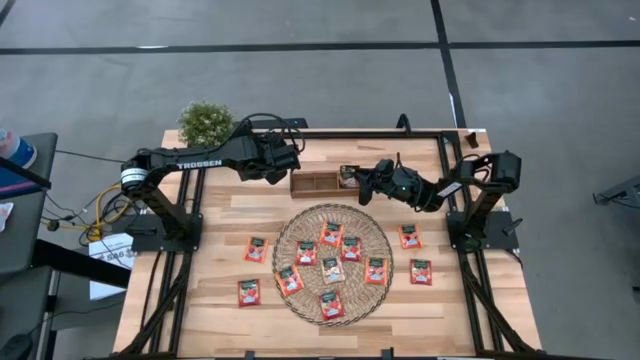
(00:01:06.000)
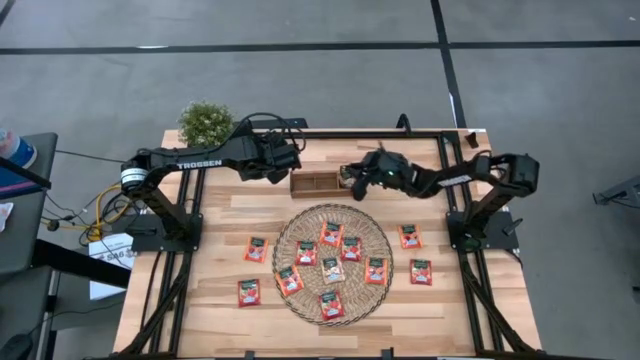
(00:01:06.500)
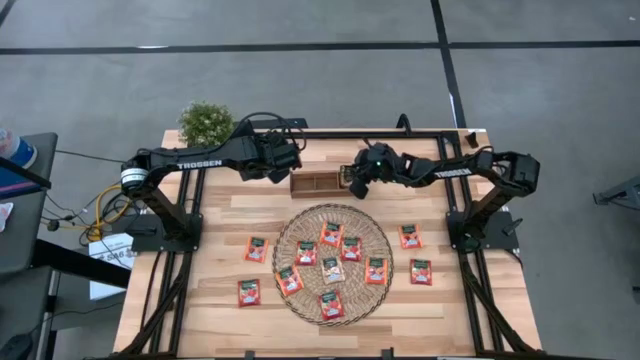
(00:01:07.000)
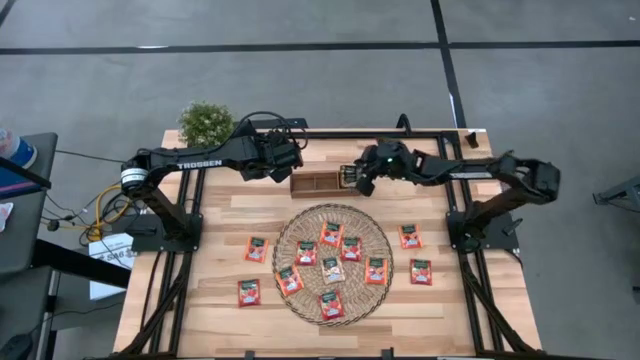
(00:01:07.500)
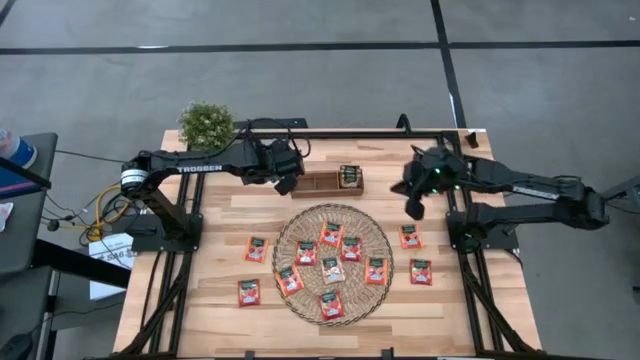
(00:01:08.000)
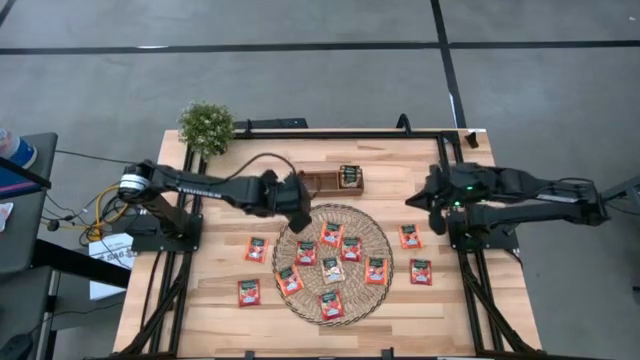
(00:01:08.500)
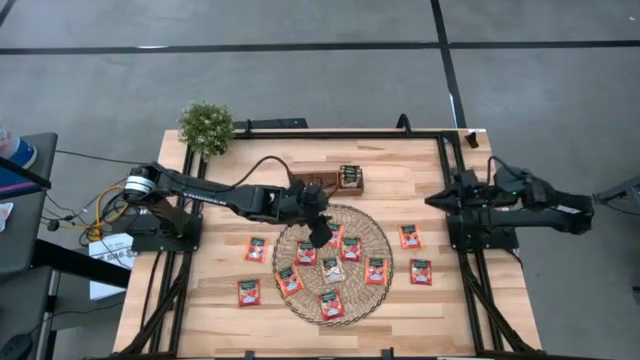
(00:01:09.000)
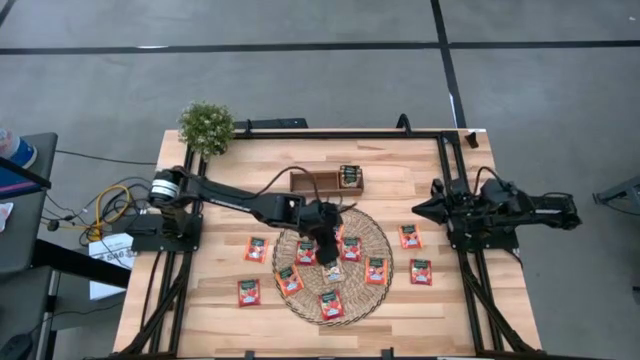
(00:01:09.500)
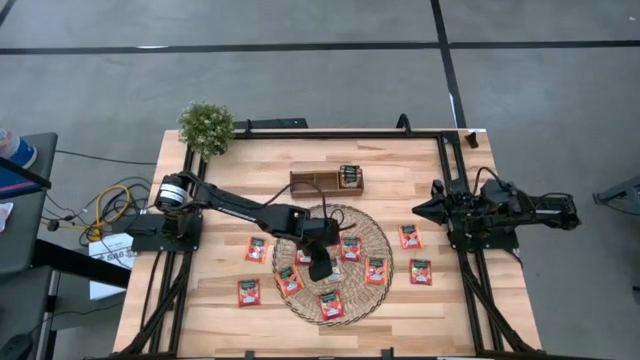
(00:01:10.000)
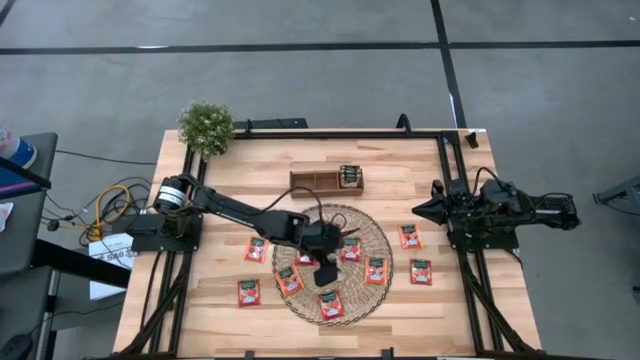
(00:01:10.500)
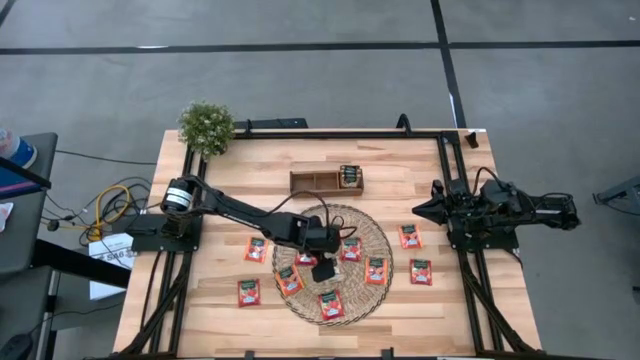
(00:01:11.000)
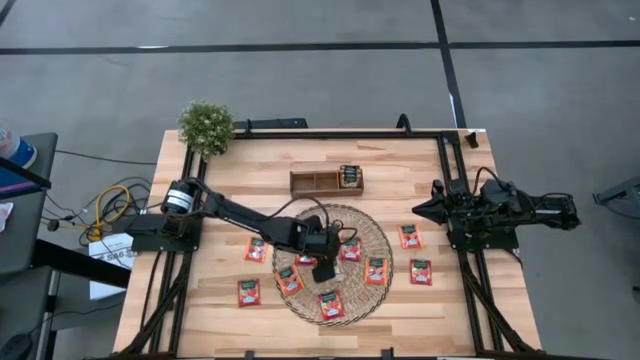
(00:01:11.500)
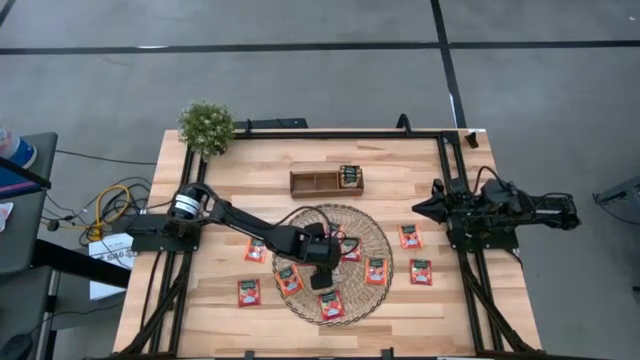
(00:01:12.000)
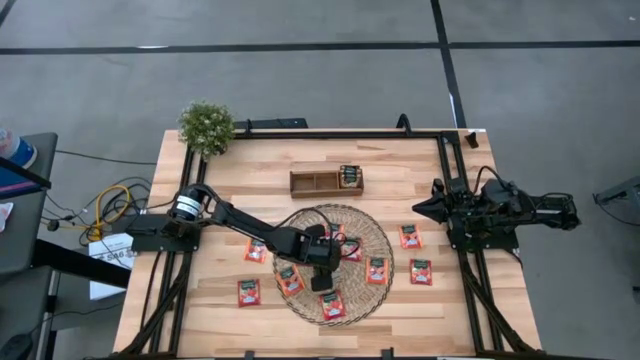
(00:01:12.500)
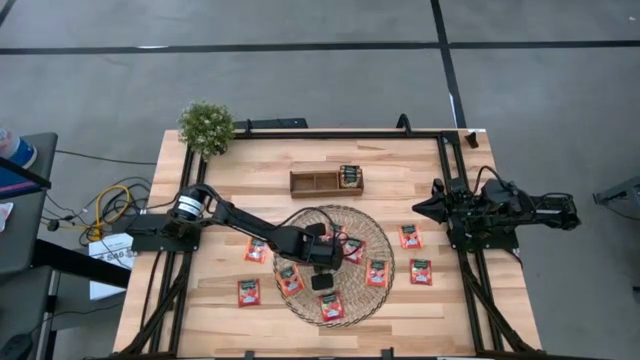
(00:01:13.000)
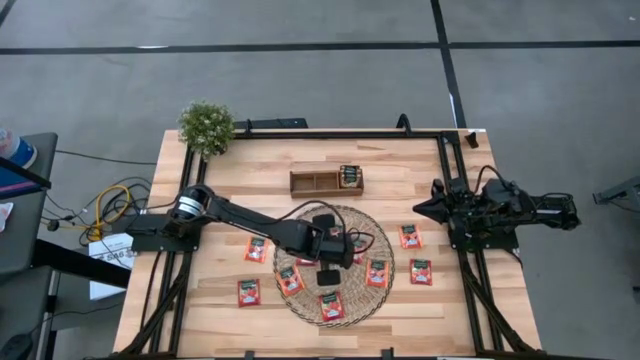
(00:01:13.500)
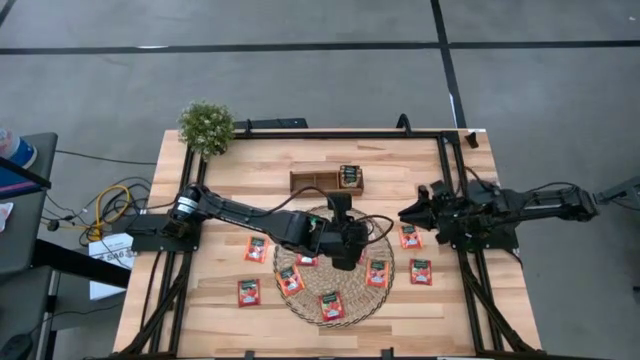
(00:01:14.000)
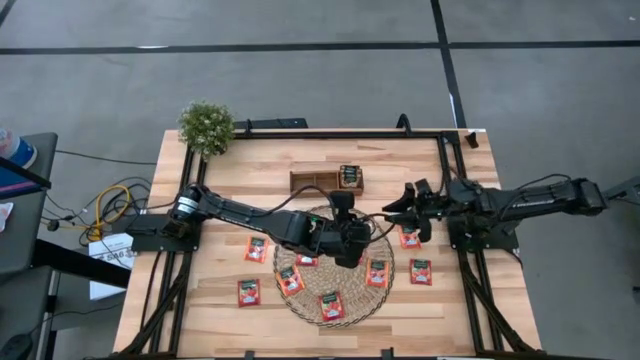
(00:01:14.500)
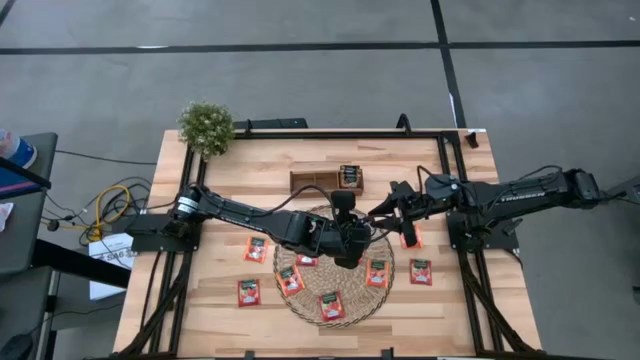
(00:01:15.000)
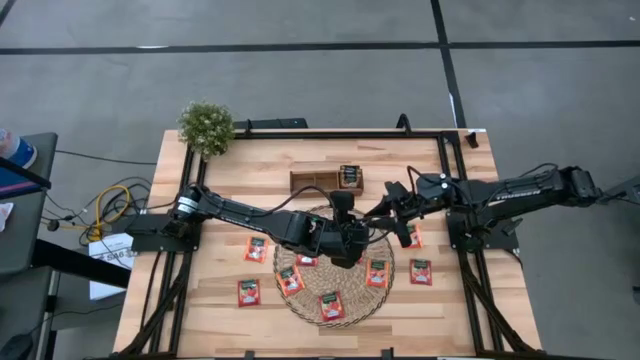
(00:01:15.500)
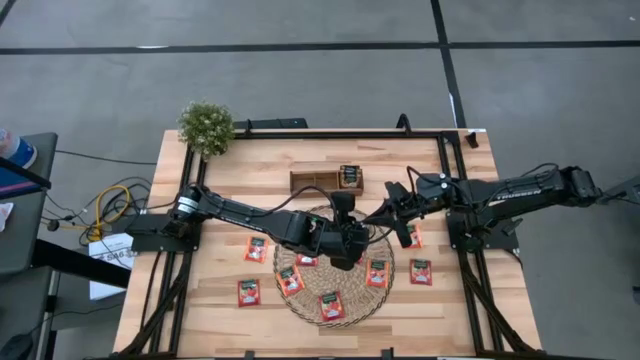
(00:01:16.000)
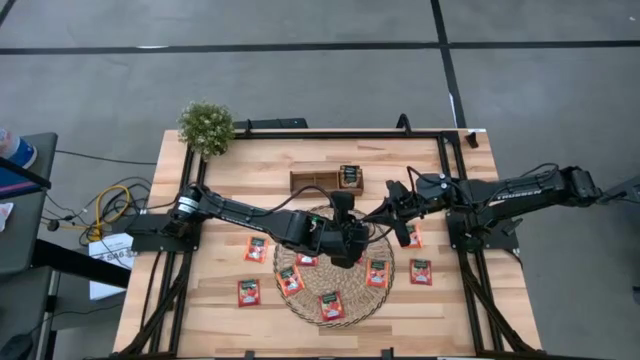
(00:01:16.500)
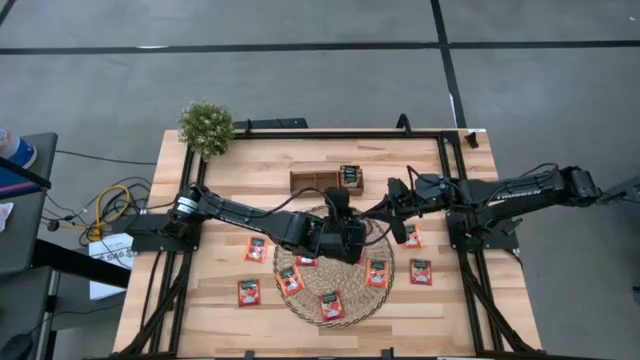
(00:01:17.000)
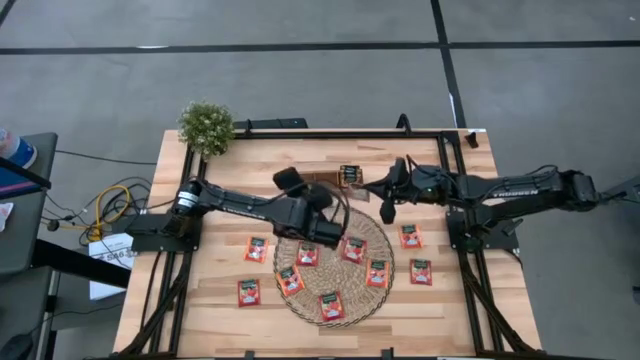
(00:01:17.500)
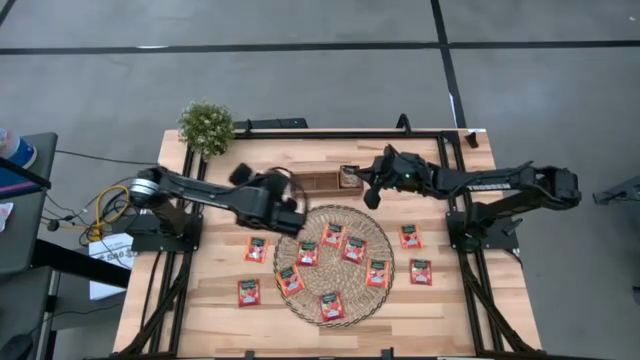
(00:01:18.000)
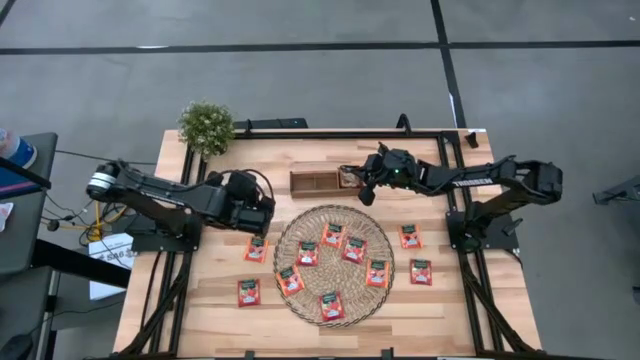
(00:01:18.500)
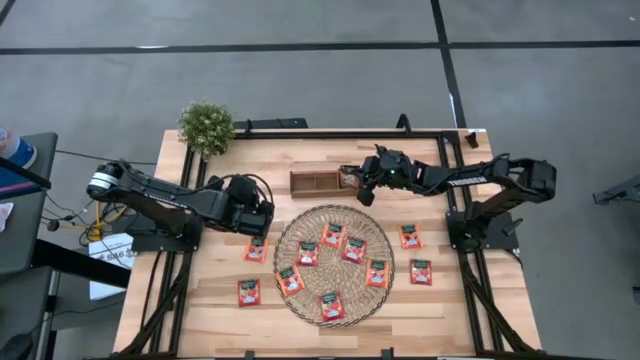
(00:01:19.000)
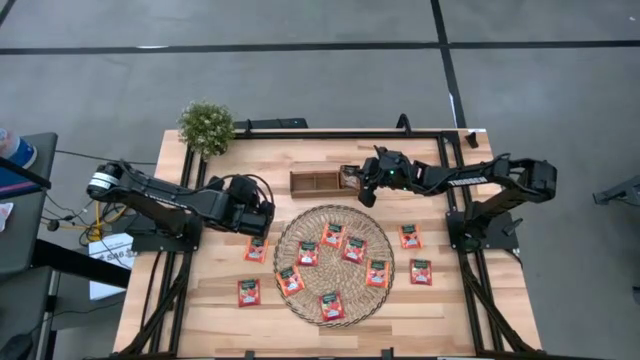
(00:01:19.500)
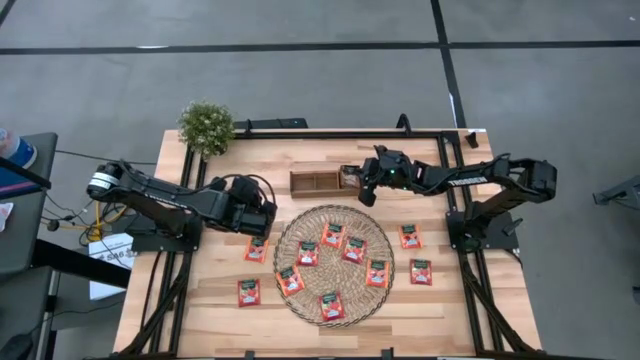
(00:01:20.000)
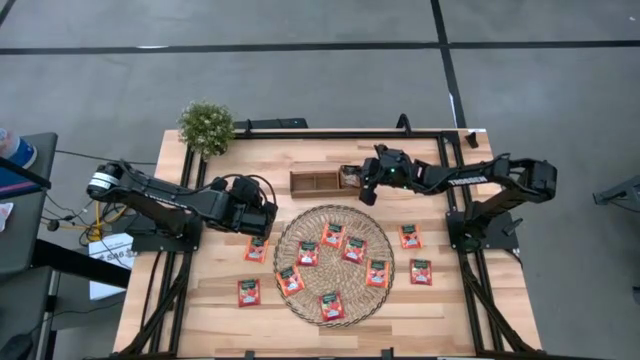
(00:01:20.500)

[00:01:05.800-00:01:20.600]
Task: Pick & Place Tea
Put the gold tea bag into the wooden organizer

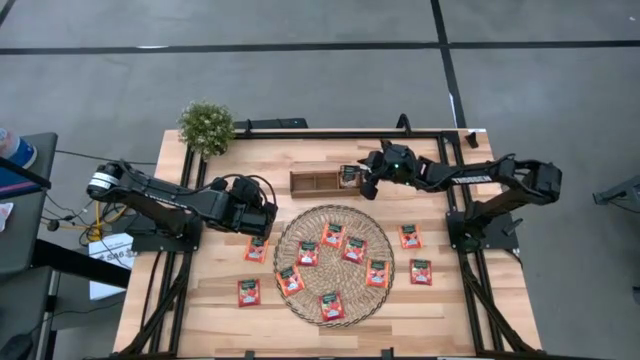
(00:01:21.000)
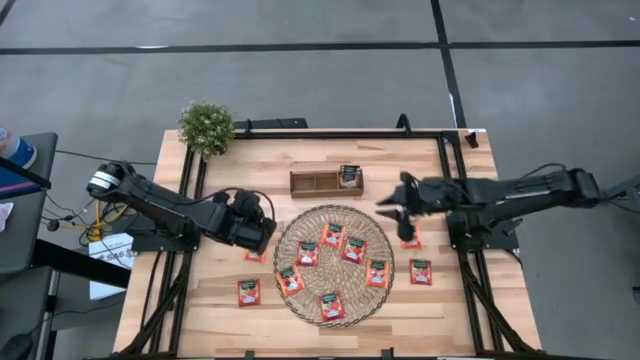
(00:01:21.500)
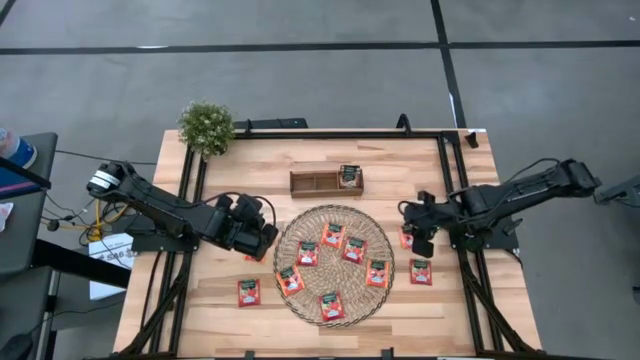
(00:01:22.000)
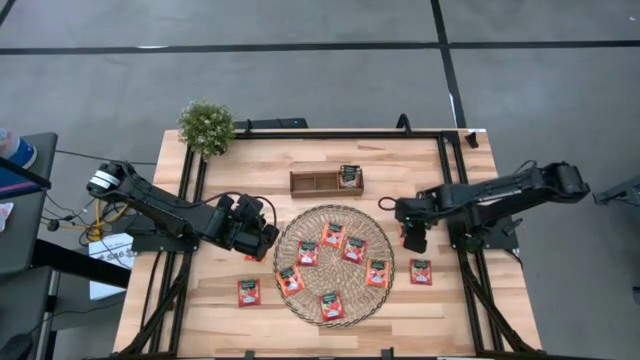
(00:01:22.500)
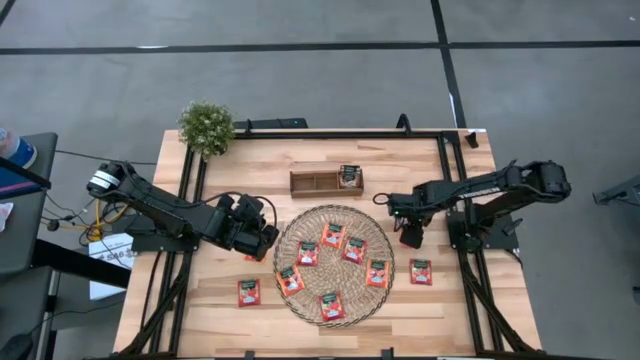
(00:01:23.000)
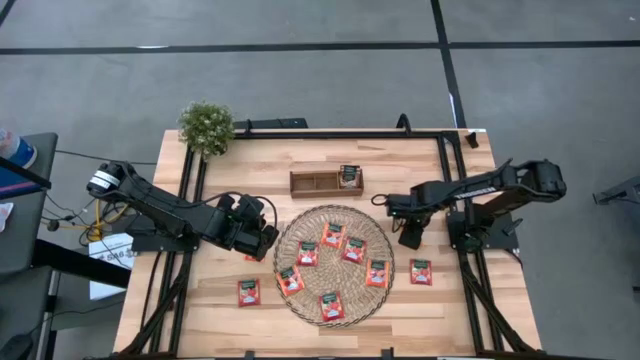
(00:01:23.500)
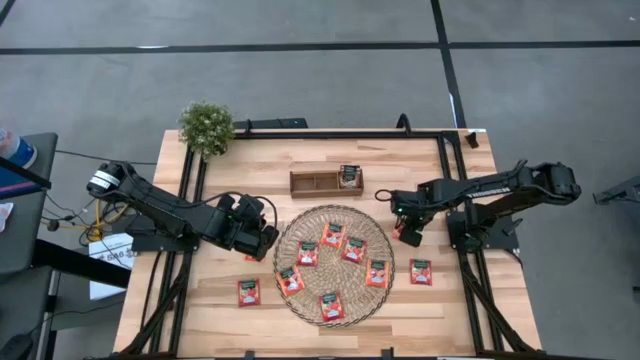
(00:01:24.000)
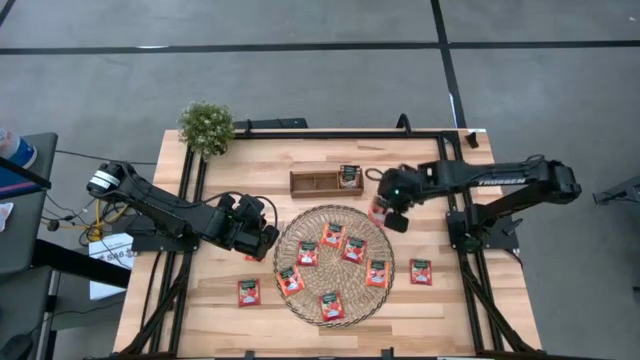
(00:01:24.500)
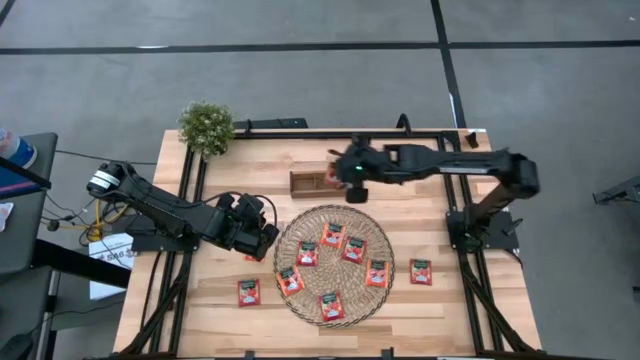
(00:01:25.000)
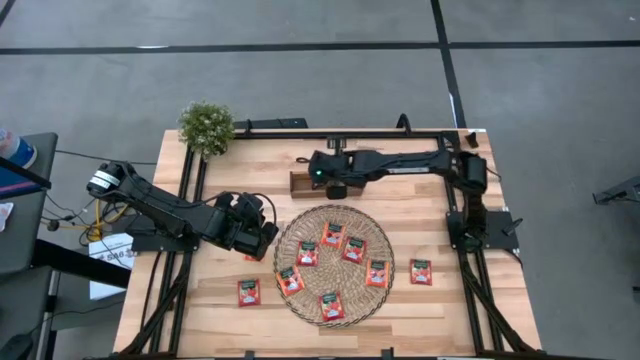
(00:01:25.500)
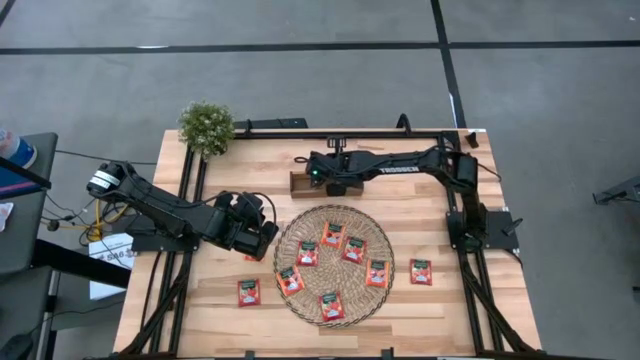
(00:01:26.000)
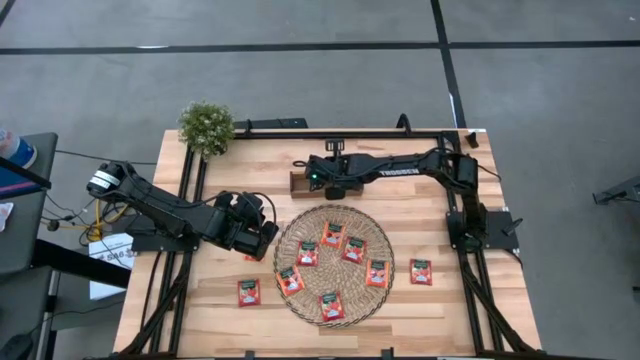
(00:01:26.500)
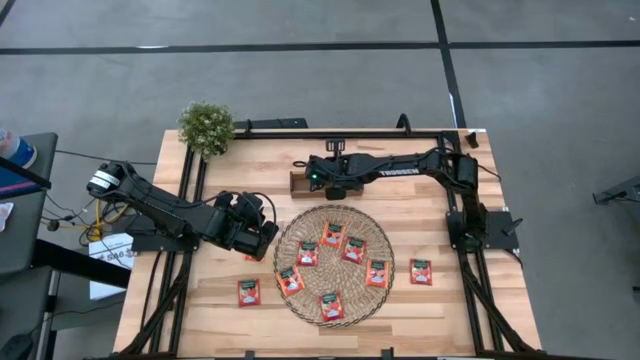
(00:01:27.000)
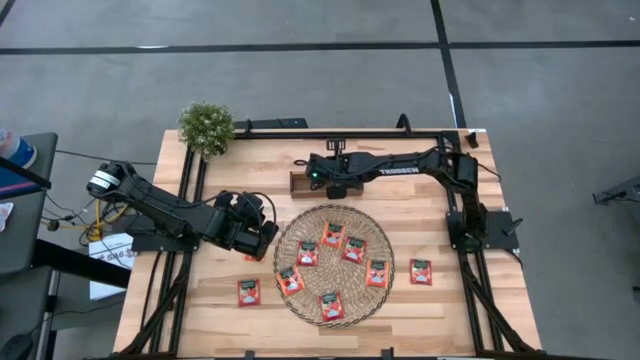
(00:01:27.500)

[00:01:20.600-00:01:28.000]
Put the orange tea bag into the wooden organizer
